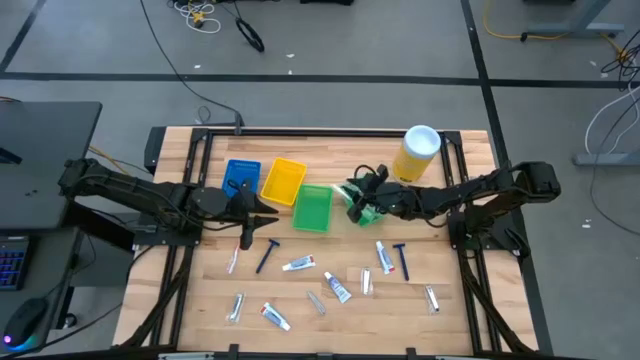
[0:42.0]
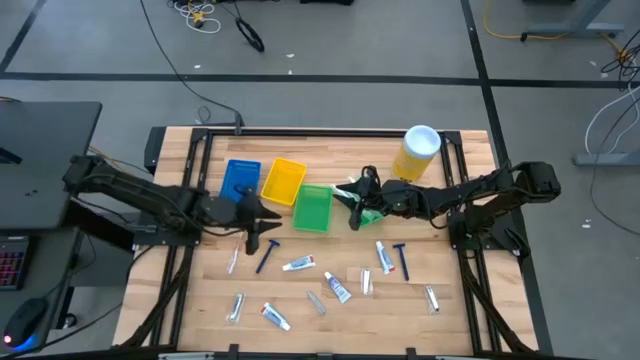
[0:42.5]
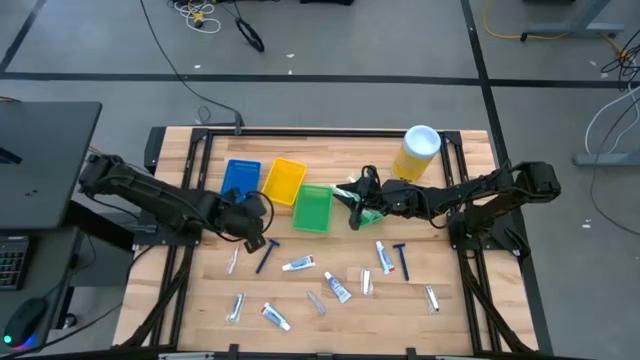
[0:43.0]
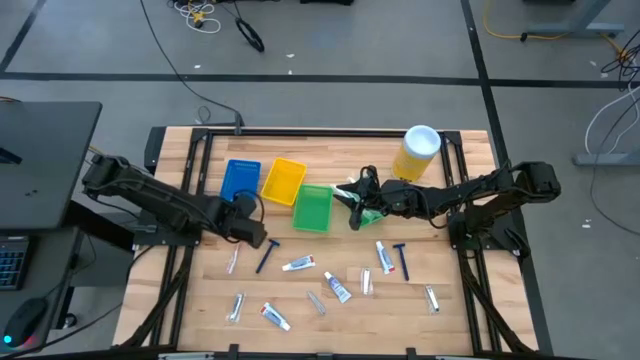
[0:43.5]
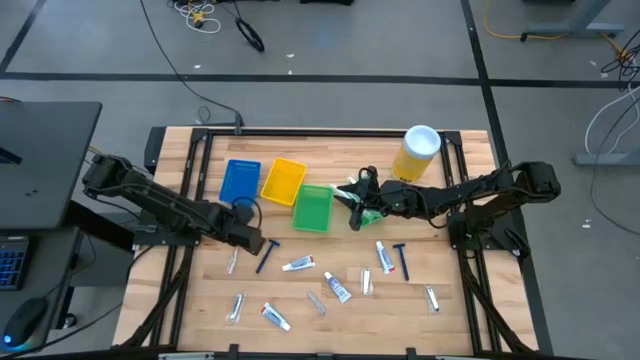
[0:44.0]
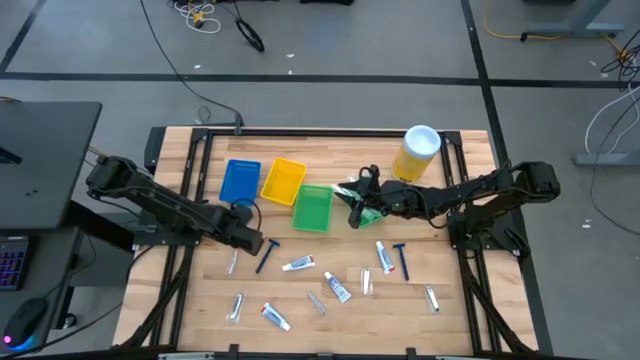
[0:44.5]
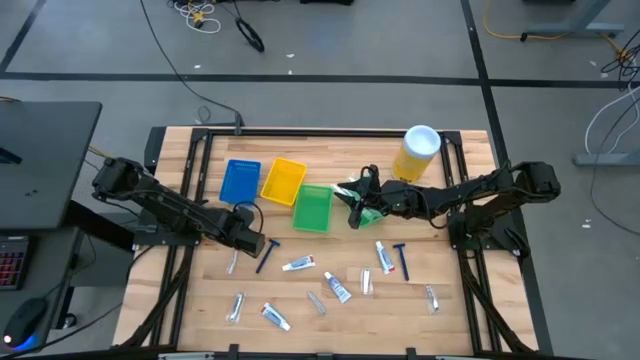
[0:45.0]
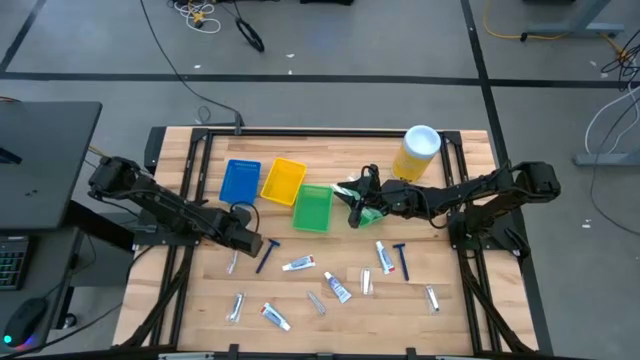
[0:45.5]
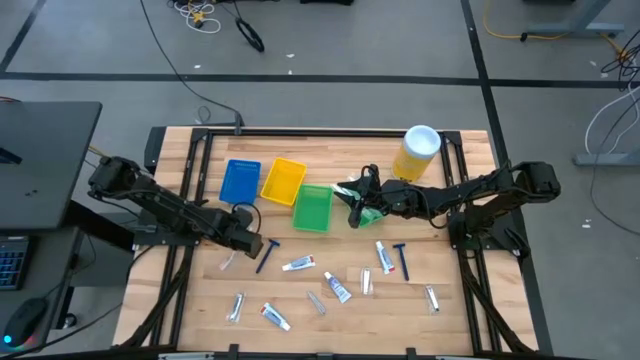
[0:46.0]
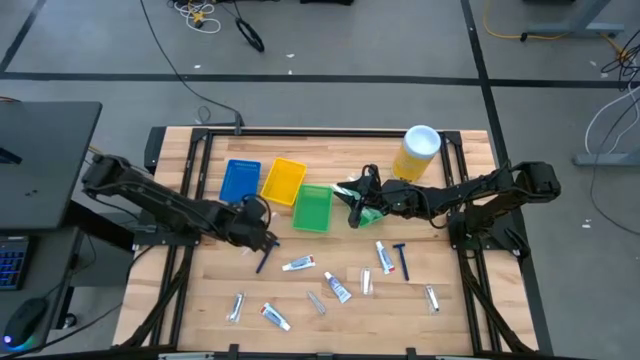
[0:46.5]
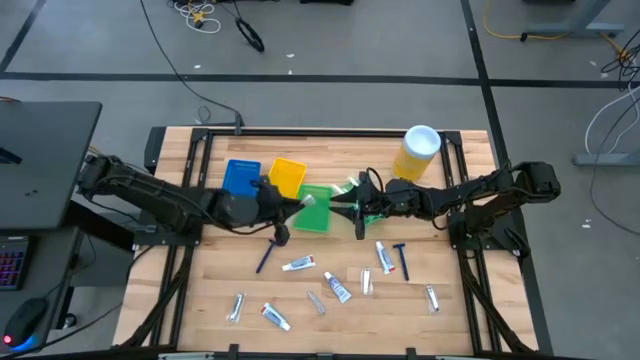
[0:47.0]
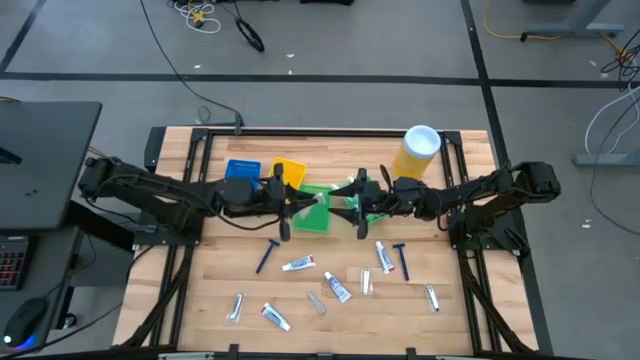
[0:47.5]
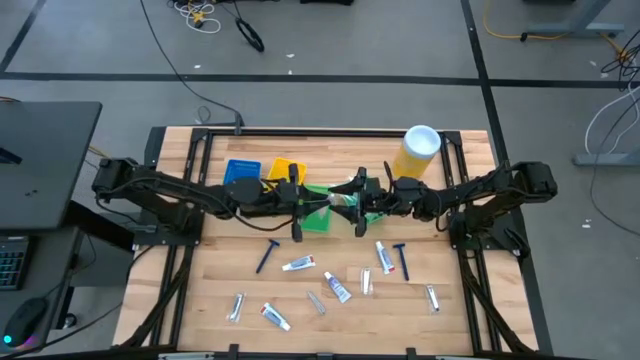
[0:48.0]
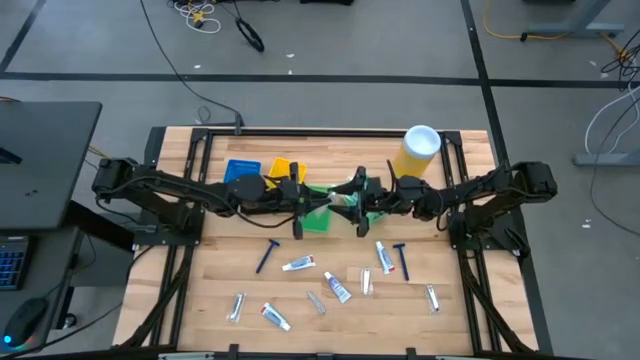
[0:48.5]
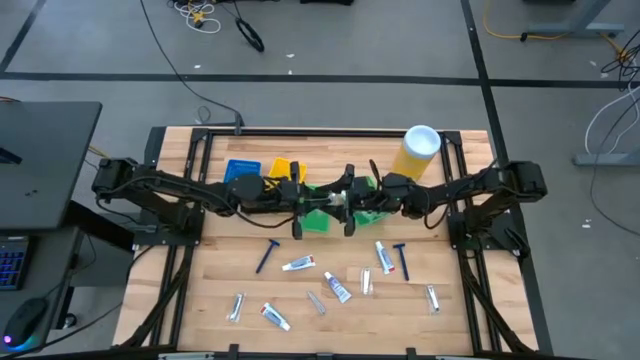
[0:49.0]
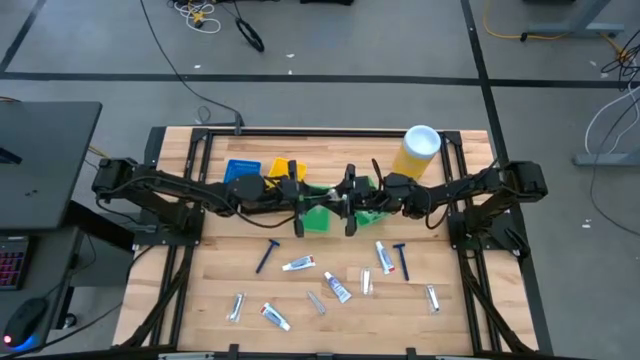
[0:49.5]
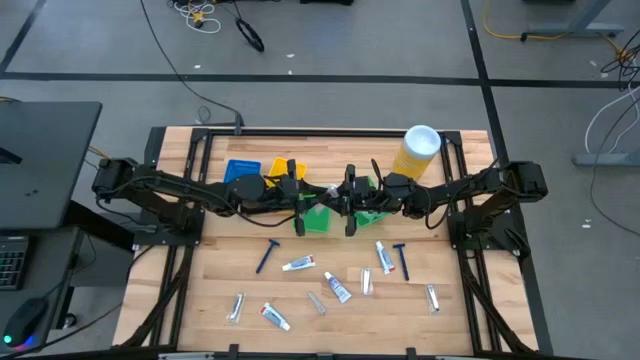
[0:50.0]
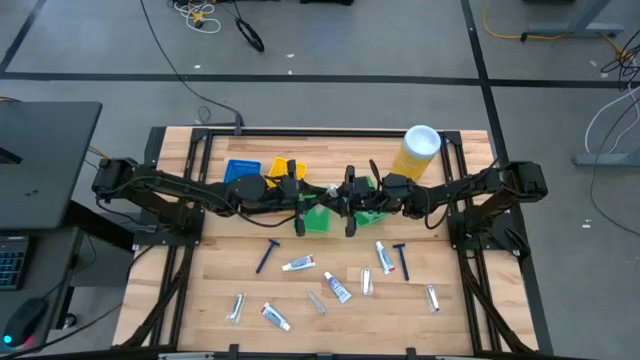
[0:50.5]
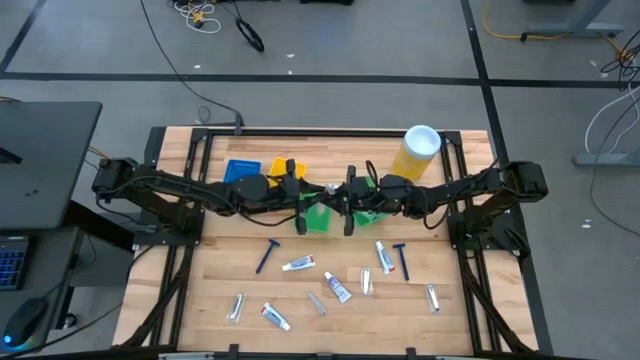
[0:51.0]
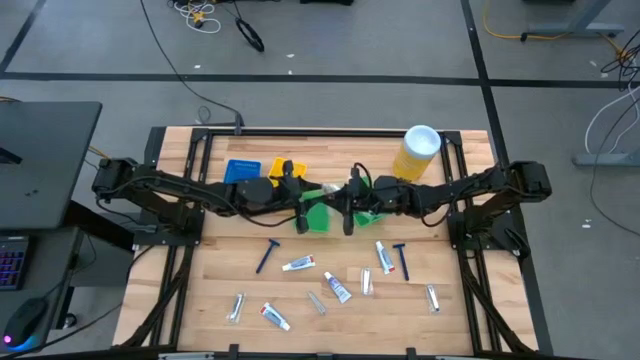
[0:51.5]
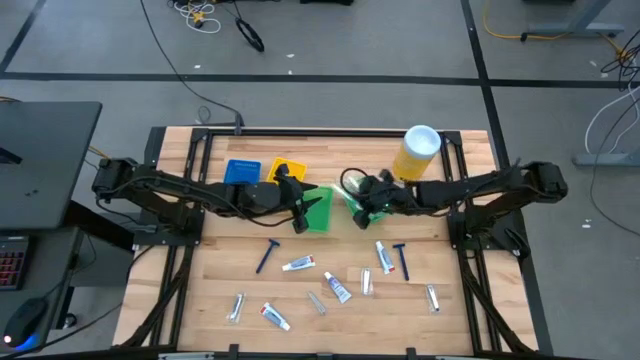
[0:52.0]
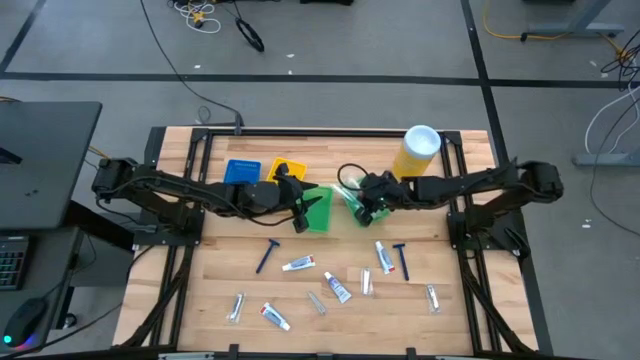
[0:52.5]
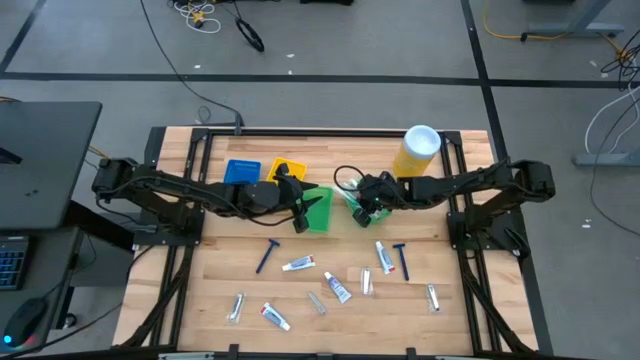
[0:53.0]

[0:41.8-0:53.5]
Task: Pick & Place Travel size toiletries
Put the red toothbrush into the right green bin

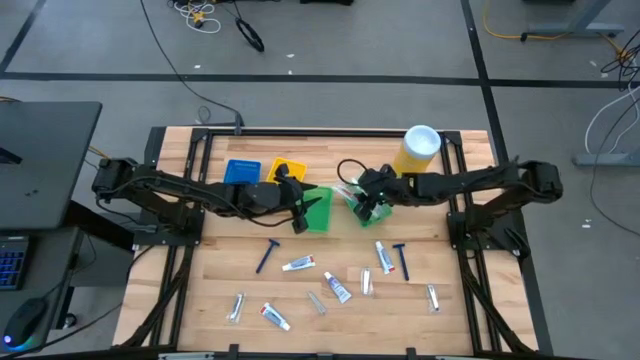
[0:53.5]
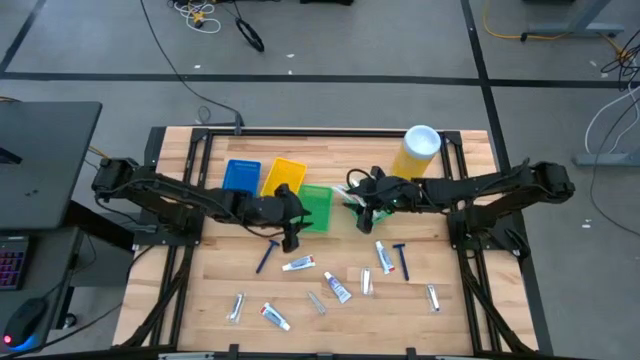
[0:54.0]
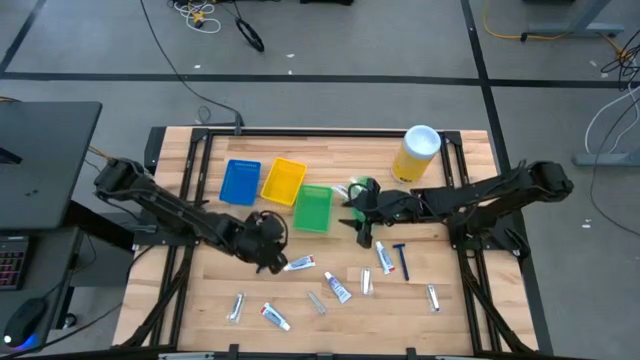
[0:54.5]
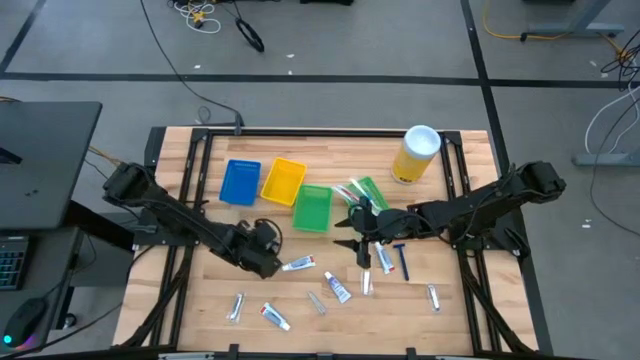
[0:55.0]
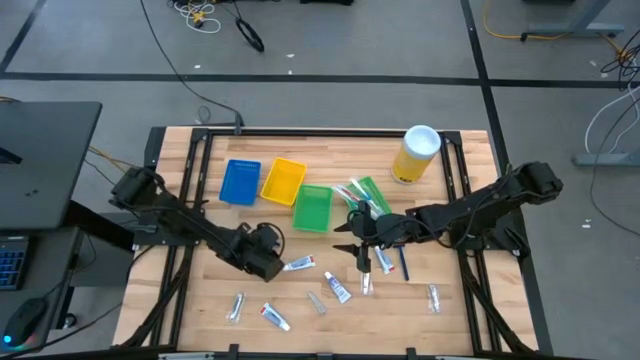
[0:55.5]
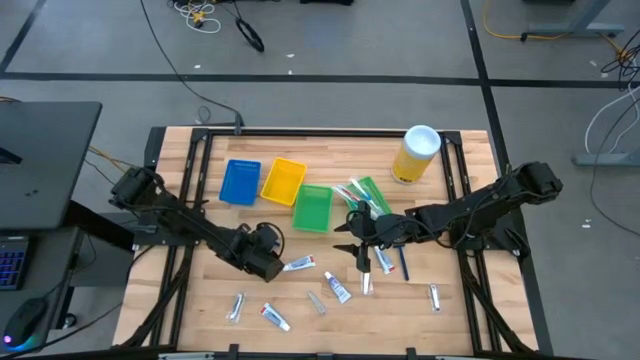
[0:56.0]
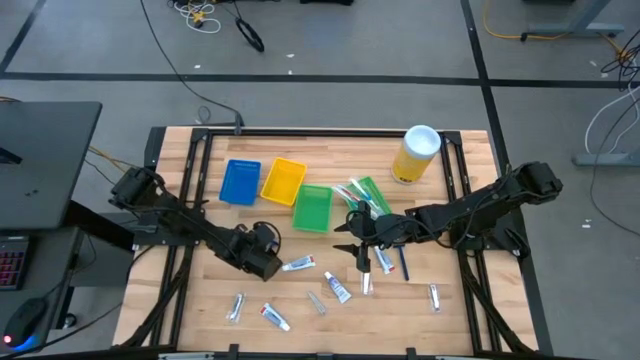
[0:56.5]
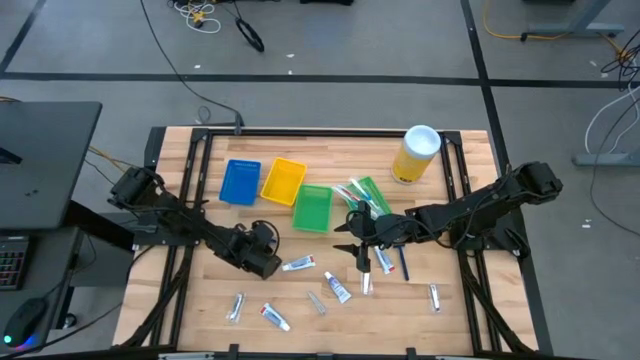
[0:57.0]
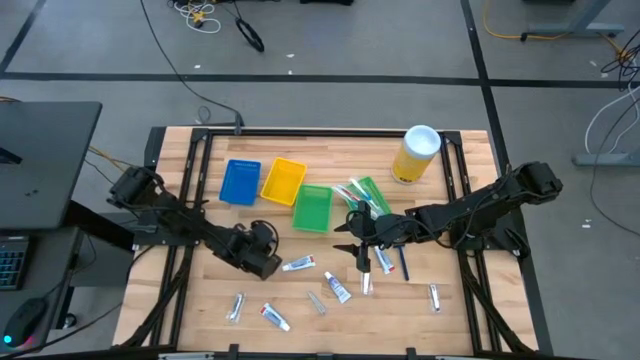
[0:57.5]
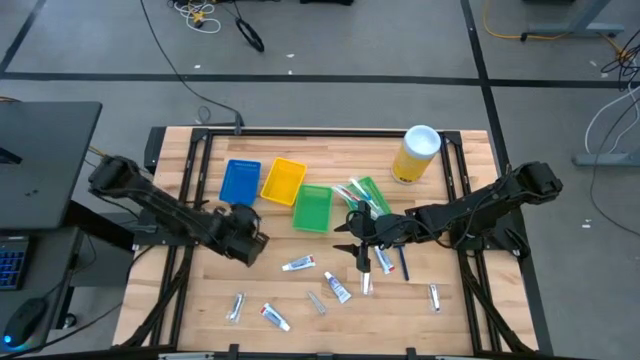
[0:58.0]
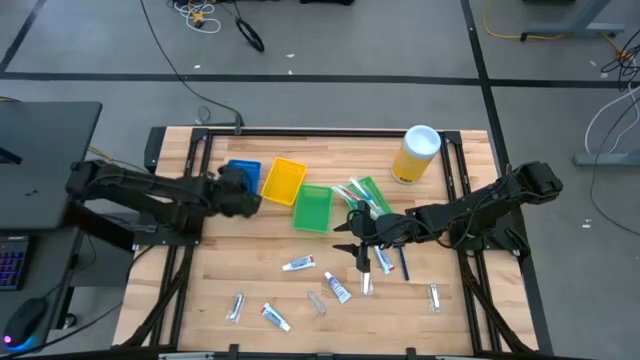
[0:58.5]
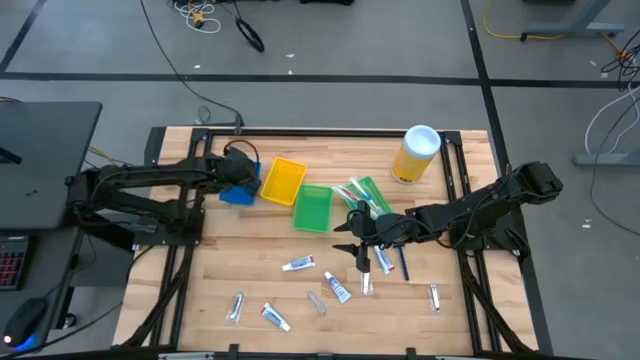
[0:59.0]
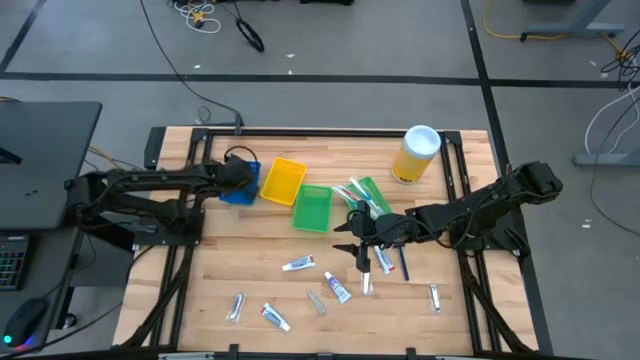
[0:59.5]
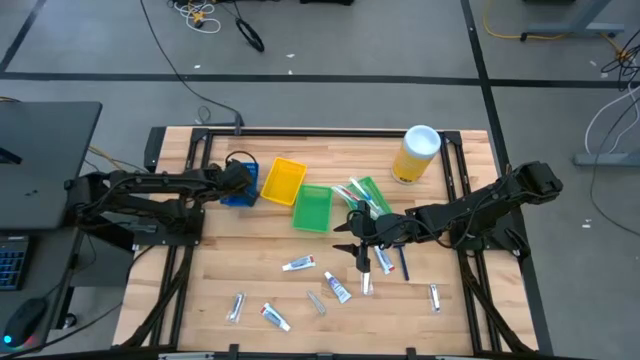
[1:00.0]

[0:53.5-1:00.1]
Put the blue razor into the blue bin

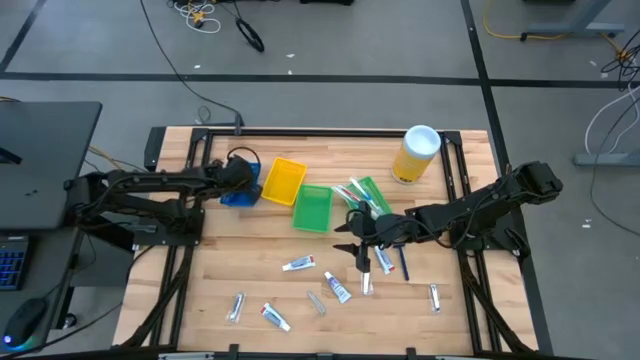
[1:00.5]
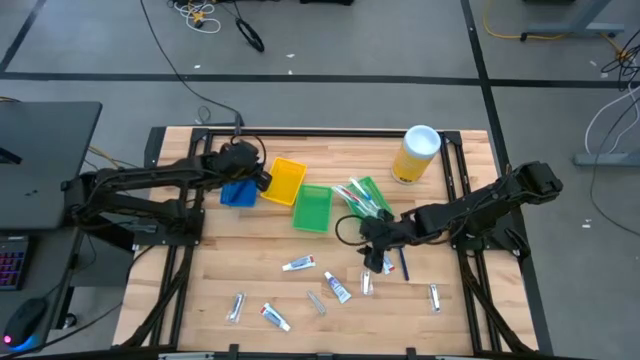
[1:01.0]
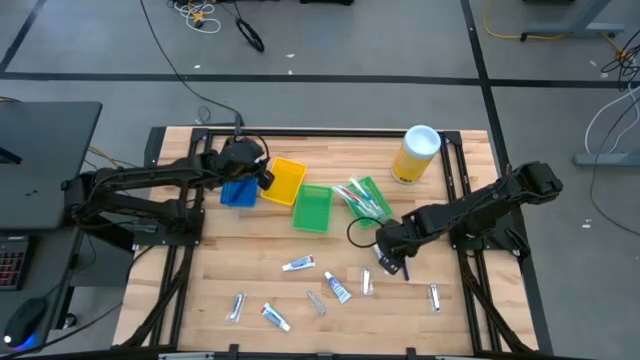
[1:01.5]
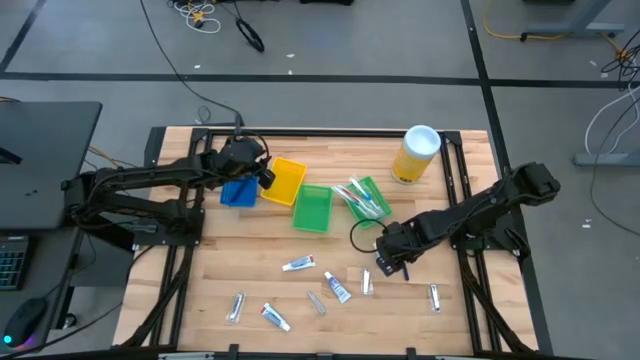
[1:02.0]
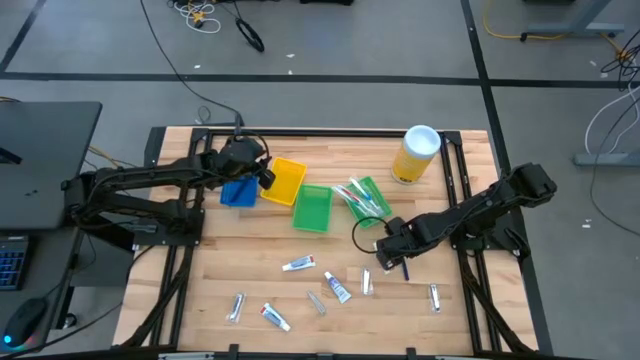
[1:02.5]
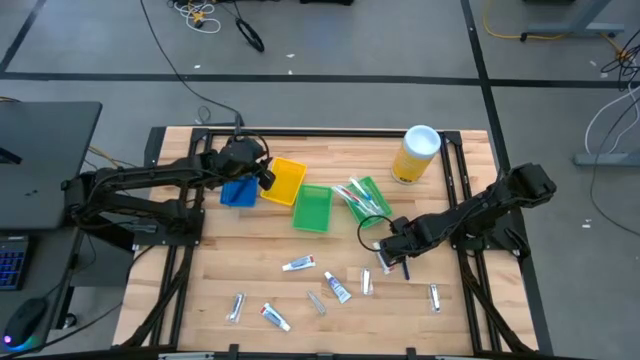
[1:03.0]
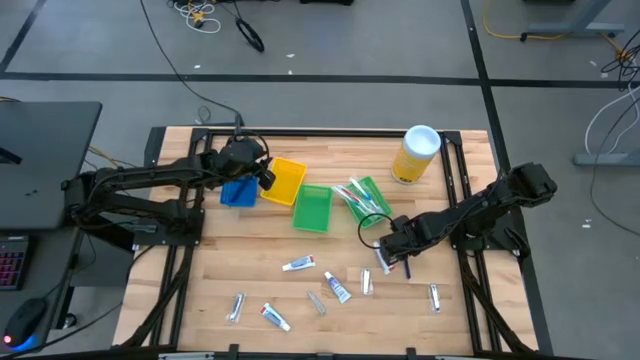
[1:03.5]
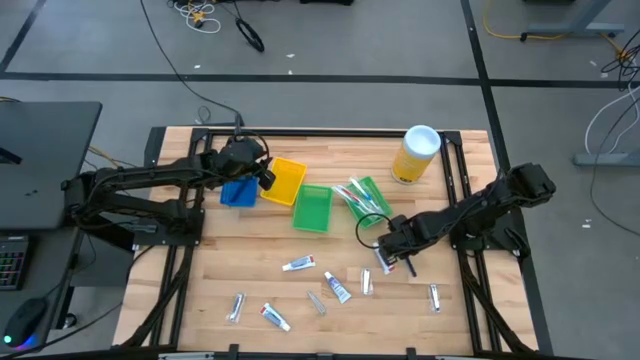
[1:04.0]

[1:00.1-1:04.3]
Put the blue razor into the blue bin
